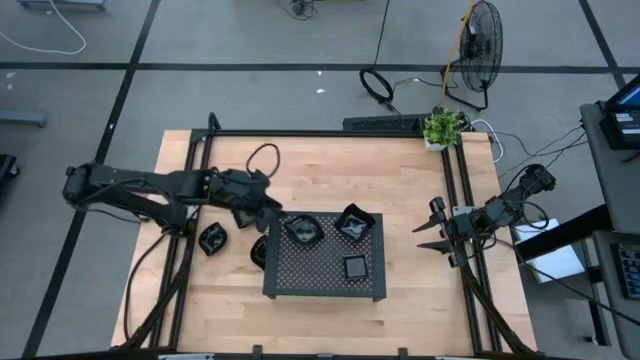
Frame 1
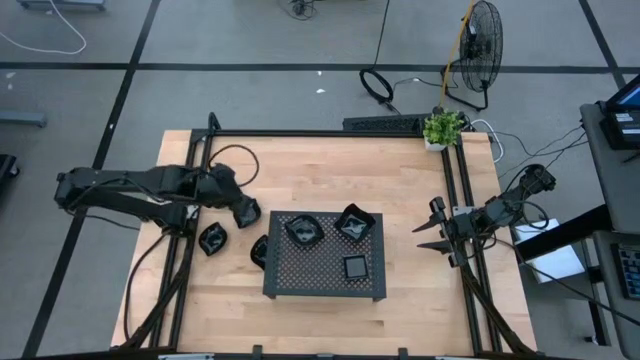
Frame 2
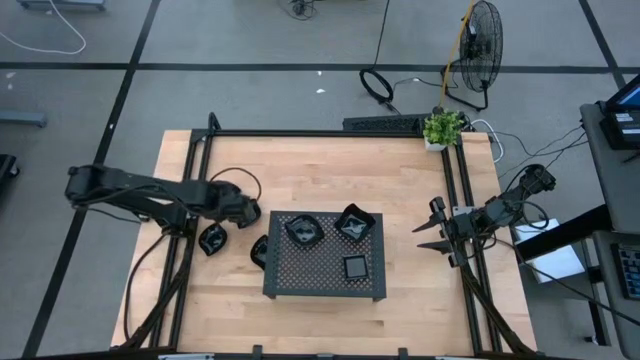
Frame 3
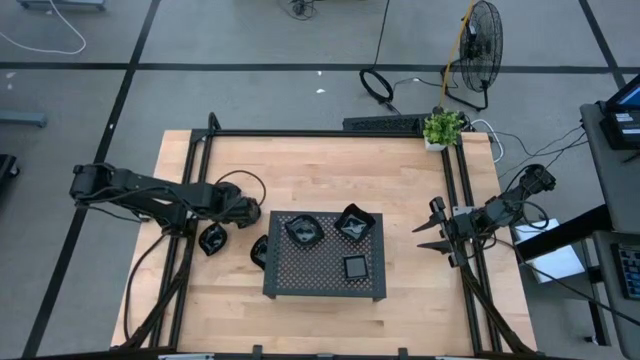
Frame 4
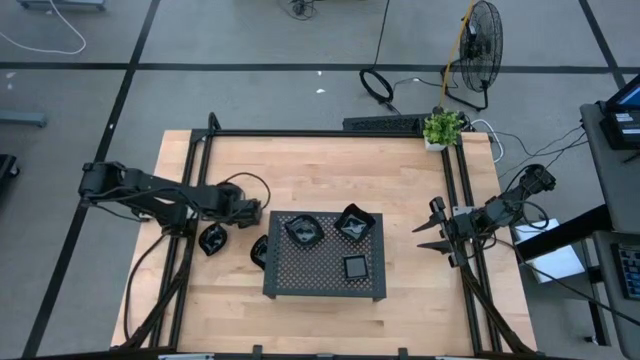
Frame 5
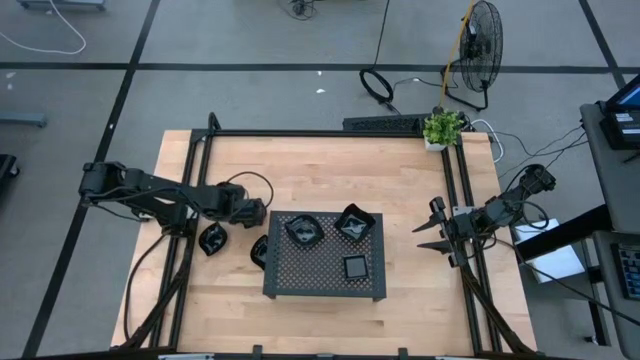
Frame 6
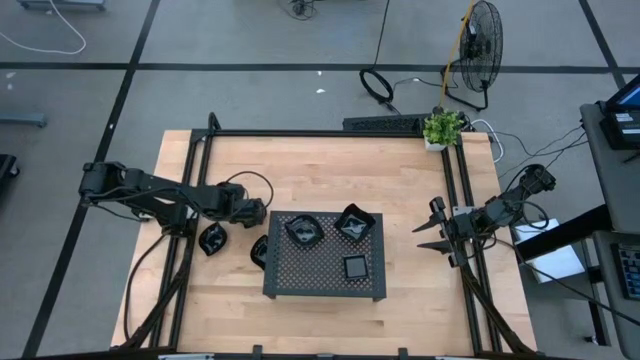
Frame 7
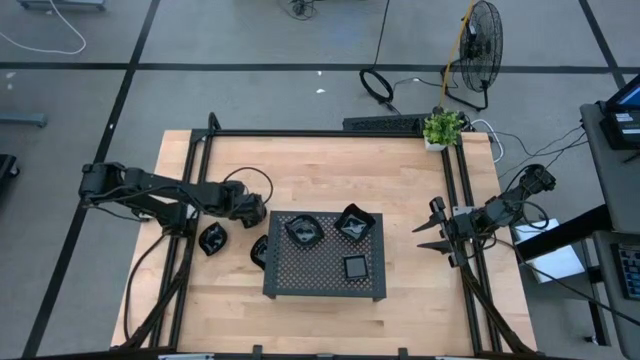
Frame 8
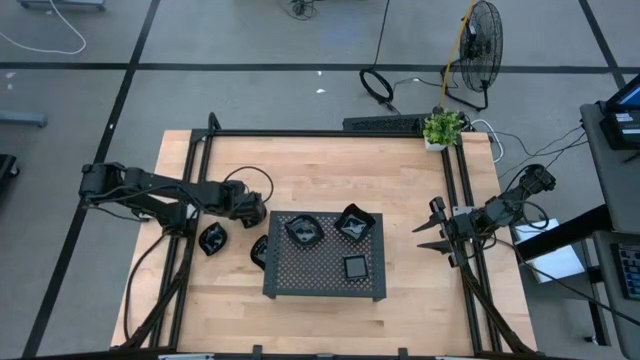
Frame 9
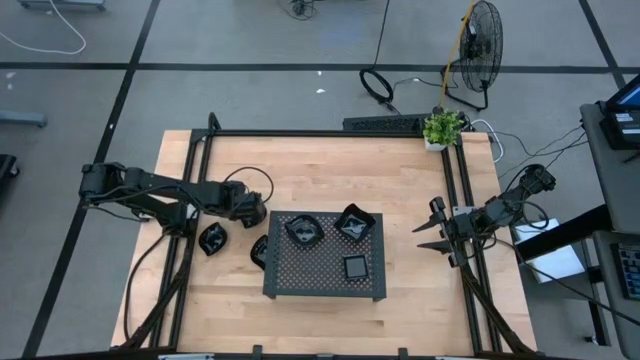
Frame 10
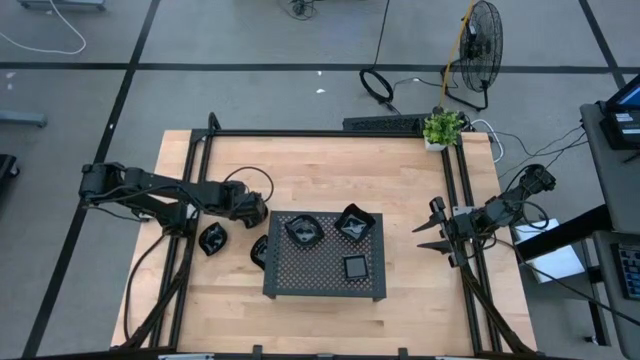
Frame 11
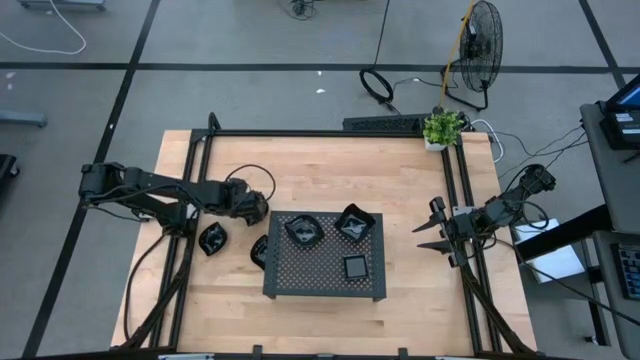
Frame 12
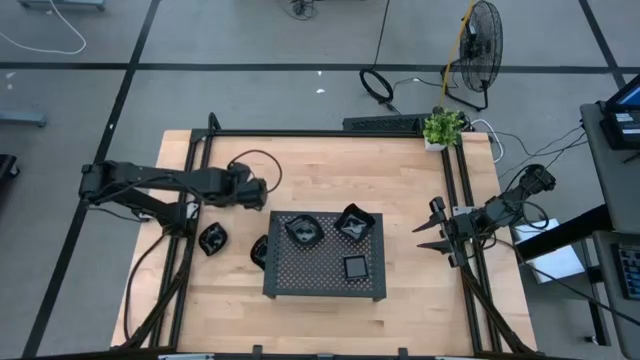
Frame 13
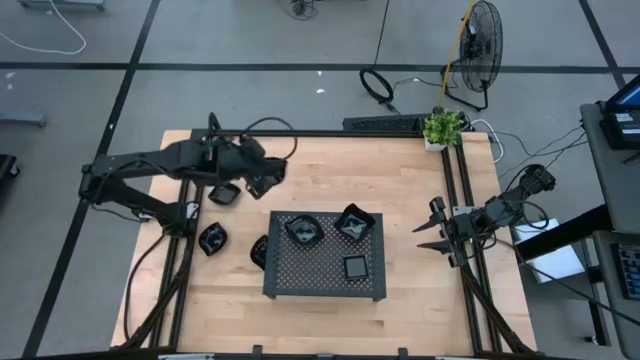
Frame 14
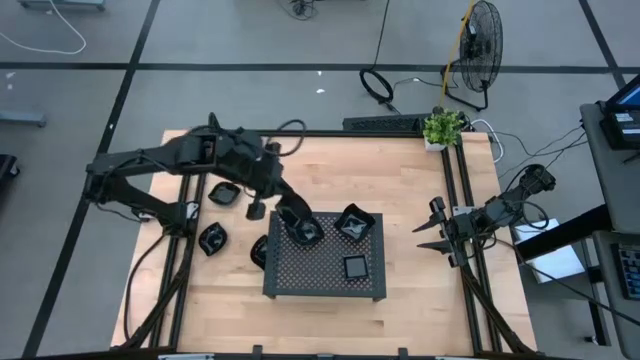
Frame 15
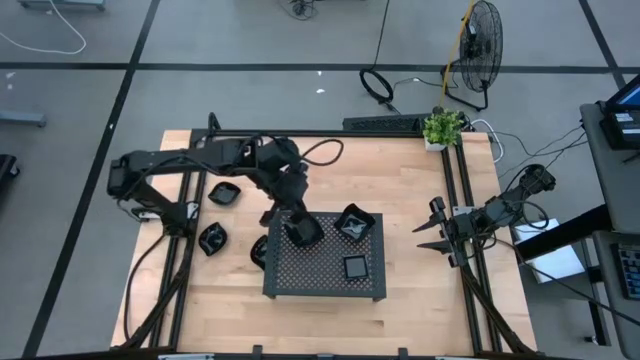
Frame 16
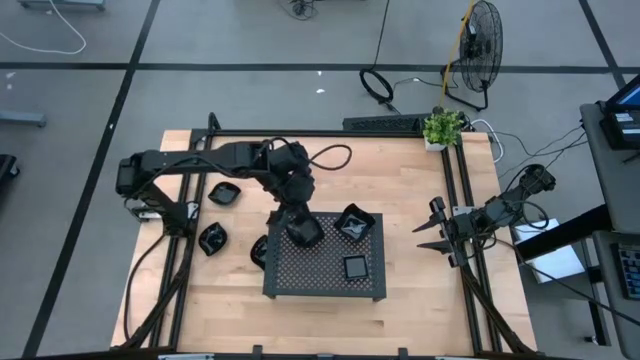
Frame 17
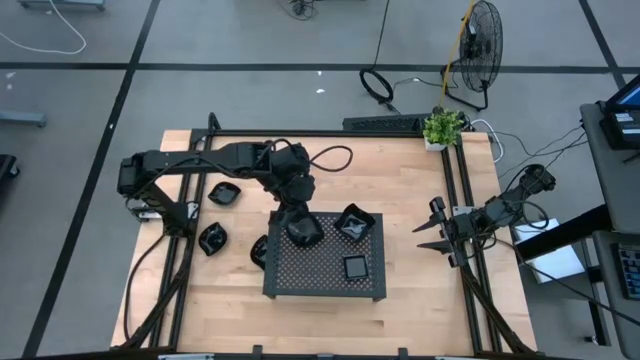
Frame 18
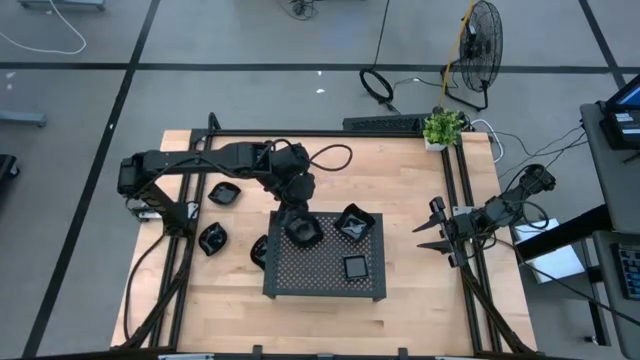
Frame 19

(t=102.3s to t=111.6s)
Task: Pick & Place Mini shaped plates
Stack the black leaf-shaped plate on top of the black leaf-shaped plate on the shelf

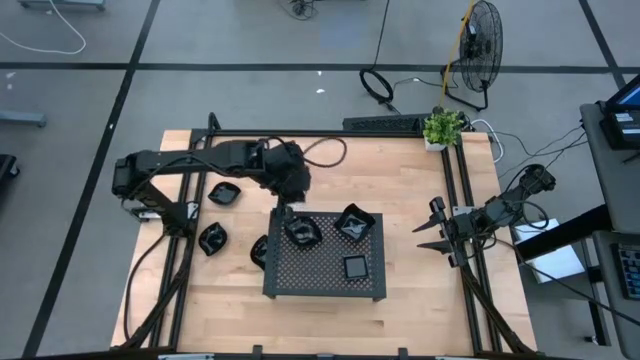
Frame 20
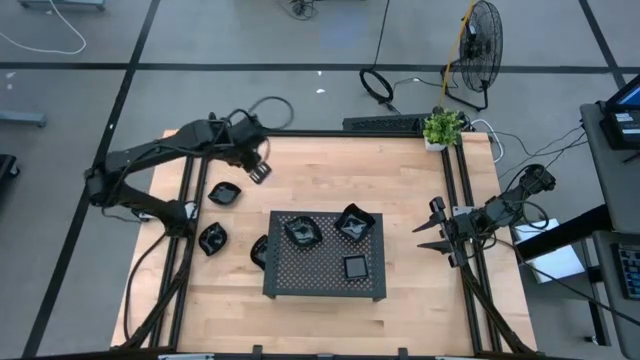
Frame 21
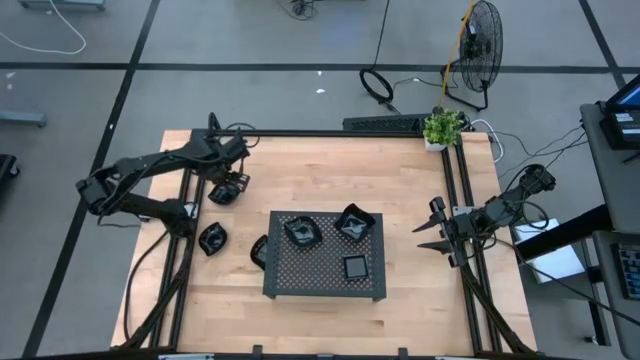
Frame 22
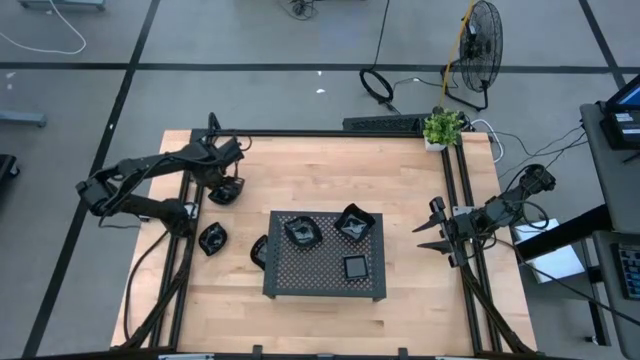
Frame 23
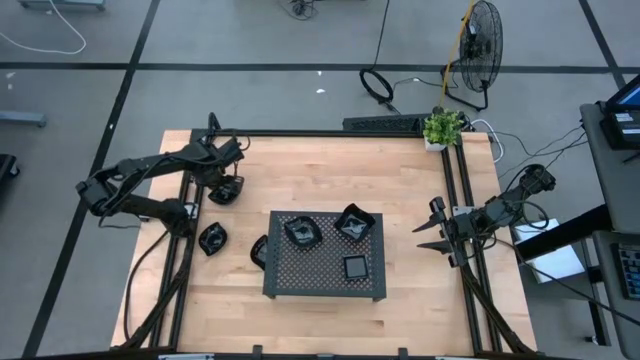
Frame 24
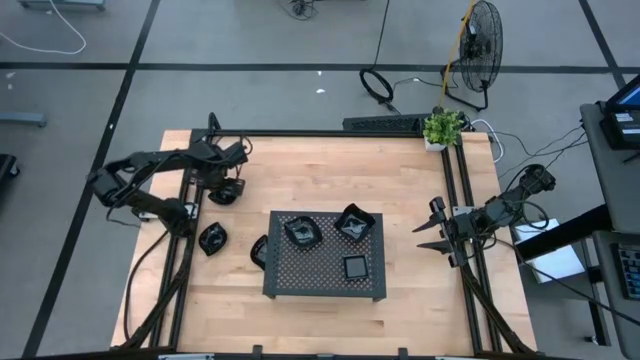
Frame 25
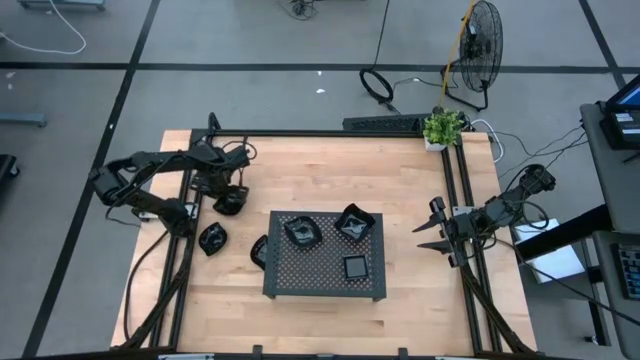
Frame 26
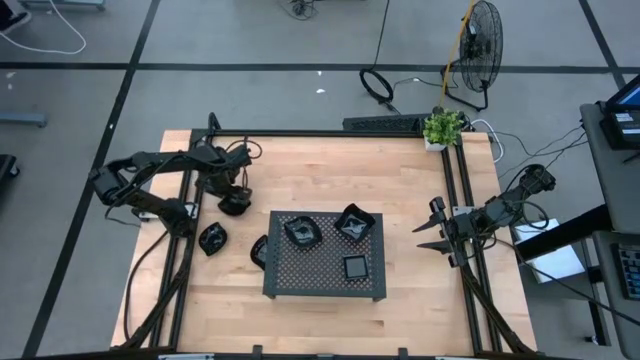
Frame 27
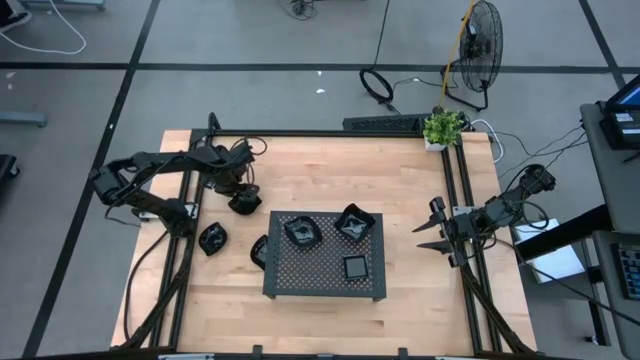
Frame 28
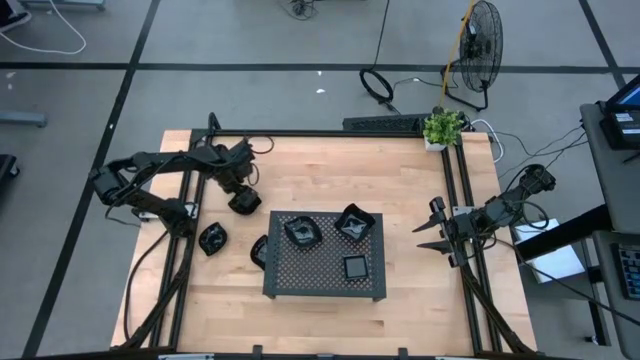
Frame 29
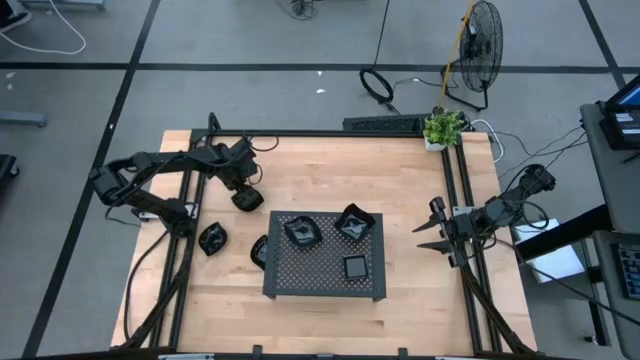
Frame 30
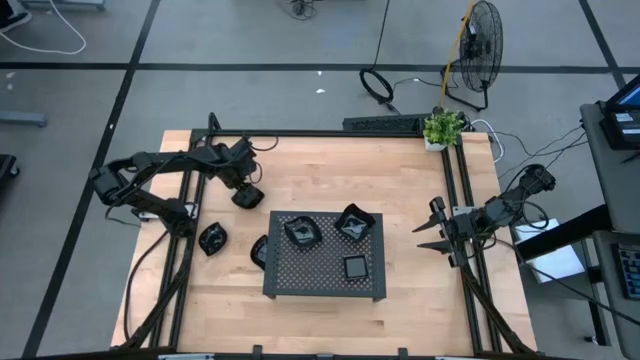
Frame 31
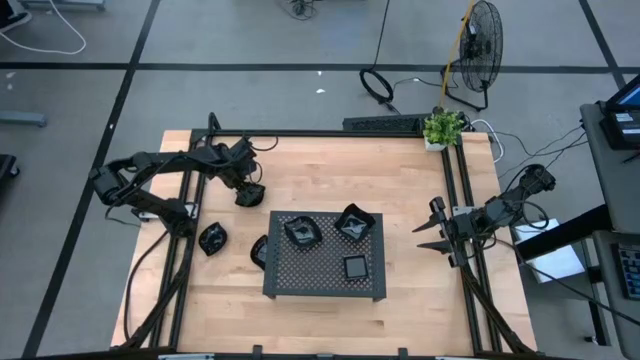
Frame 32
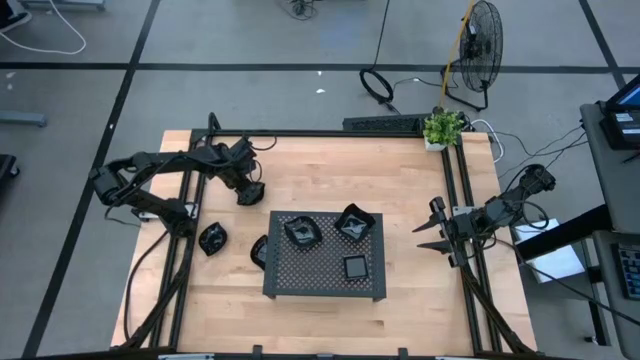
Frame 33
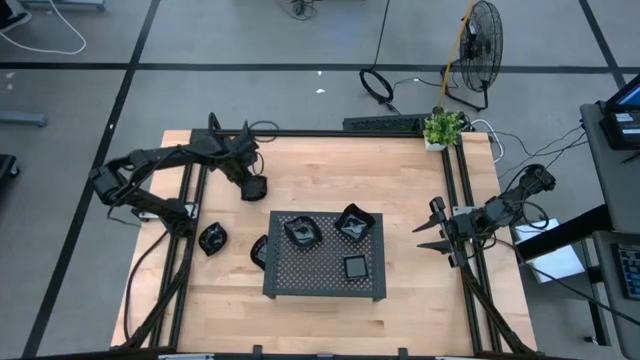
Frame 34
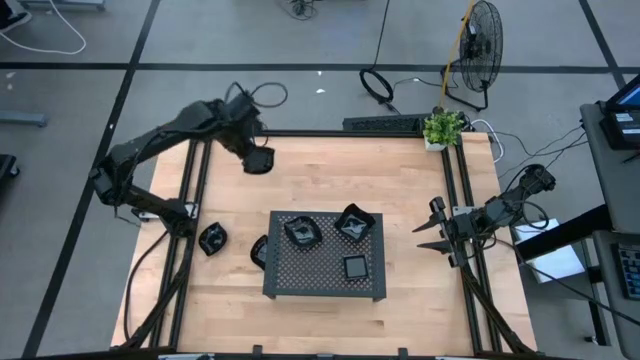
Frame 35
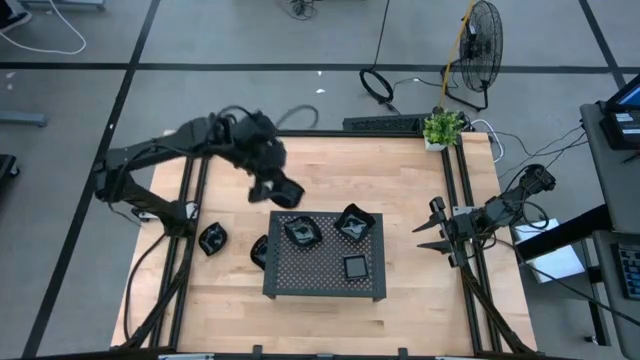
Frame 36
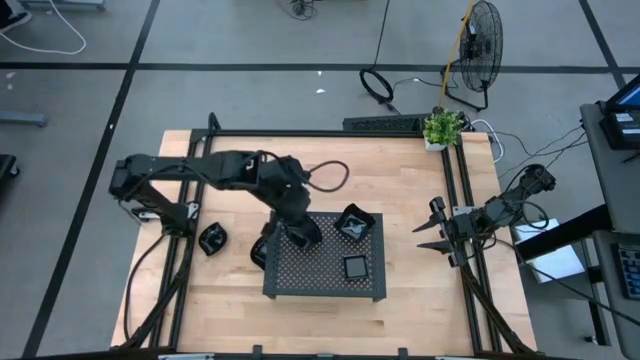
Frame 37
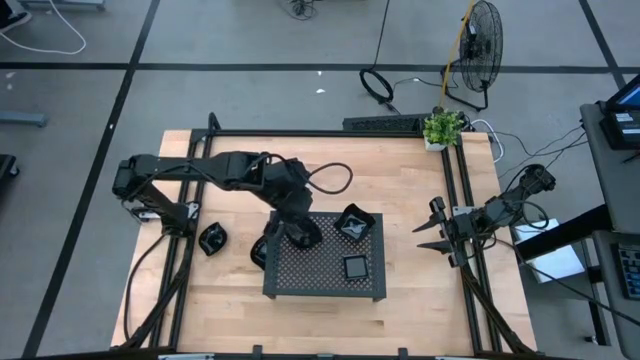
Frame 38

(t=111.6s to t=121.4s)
Stack the black leaf-shaped plate on top of the black leaf-shaped plates on the shelf

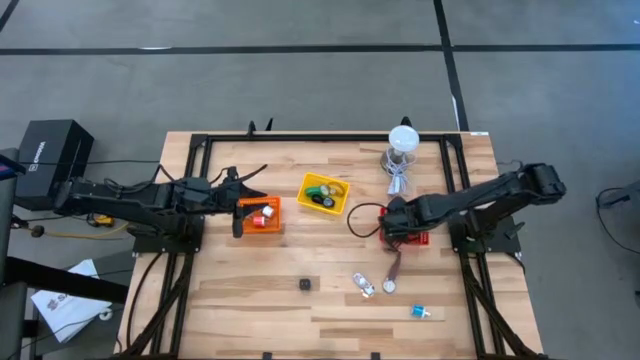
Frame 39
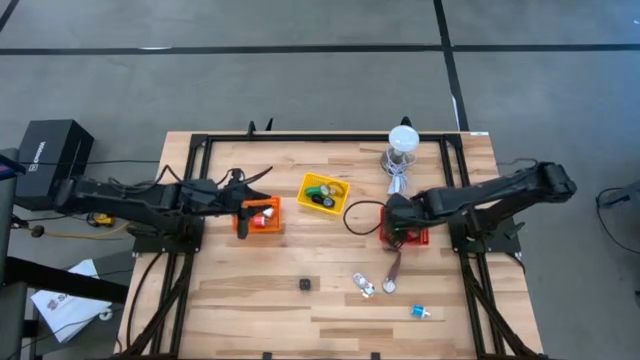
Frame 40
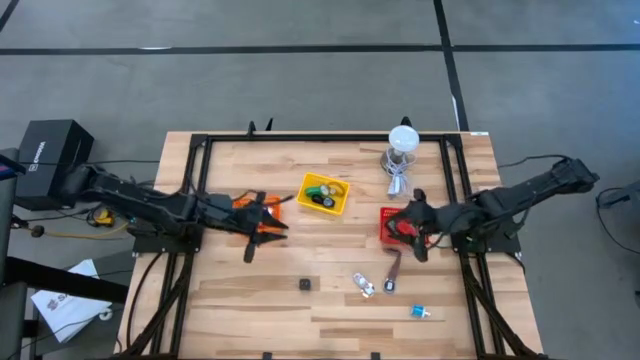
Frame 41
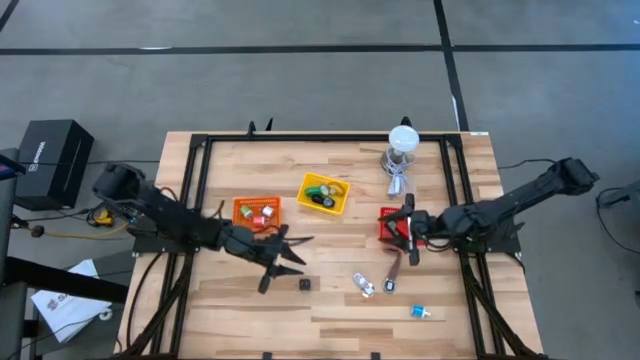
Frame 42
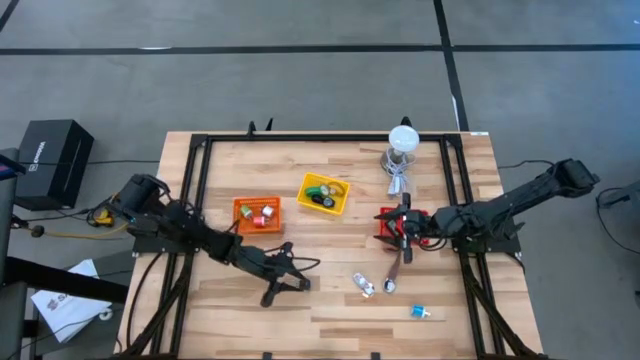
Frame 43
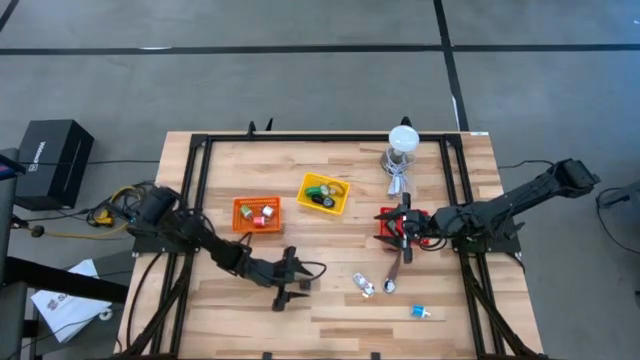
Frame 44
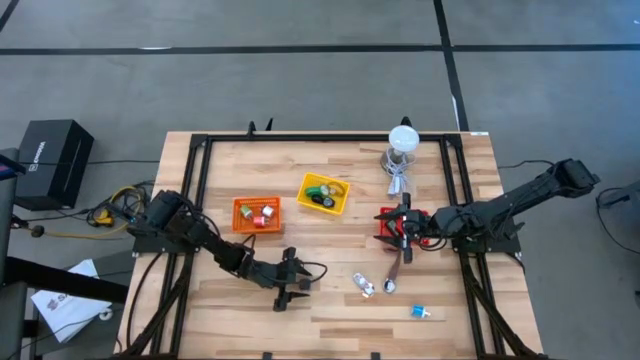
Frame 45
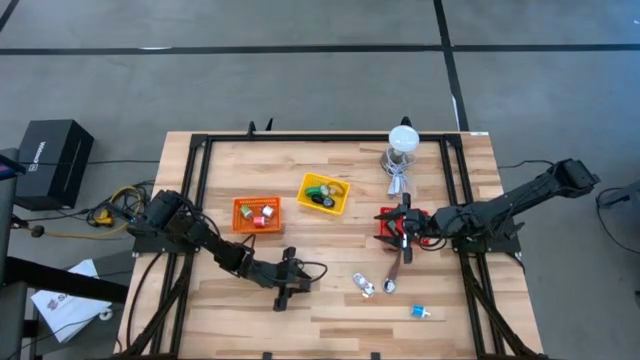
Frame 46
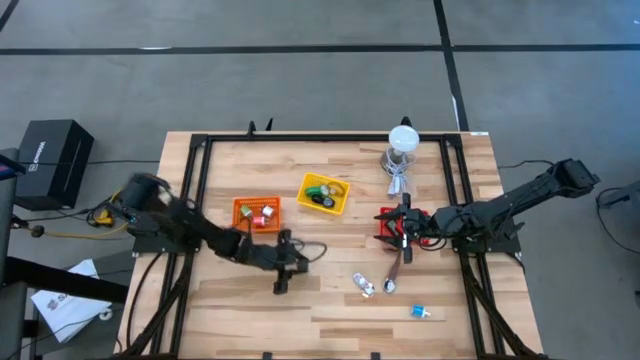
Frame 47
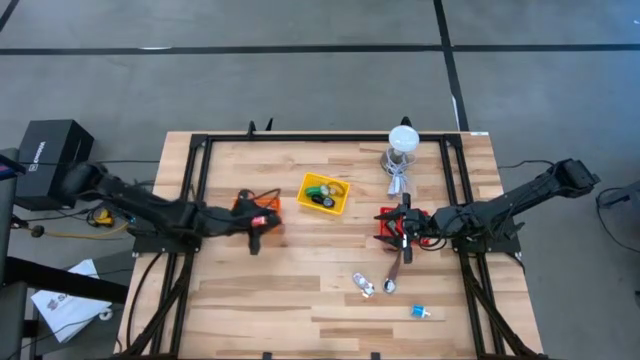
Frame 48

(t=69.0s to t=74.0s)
Task: Pick & Place Office items
Put the black charging adapter into the orange bin
